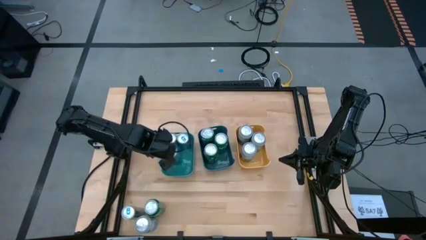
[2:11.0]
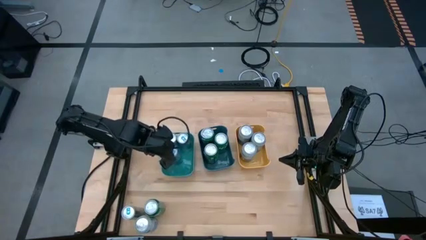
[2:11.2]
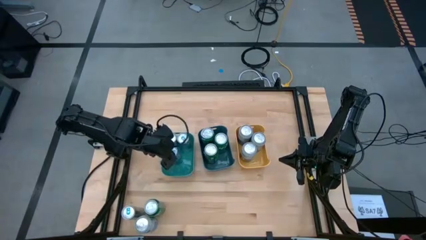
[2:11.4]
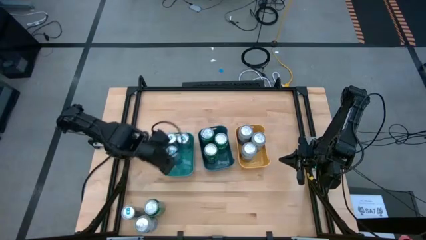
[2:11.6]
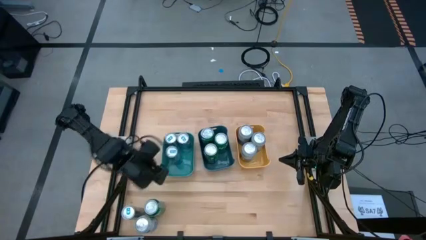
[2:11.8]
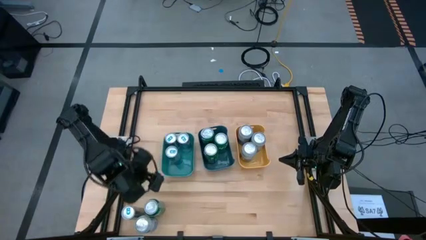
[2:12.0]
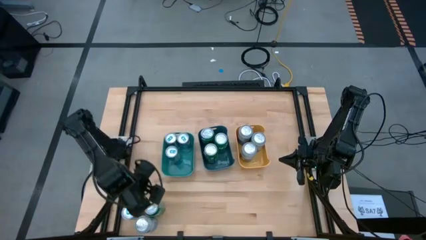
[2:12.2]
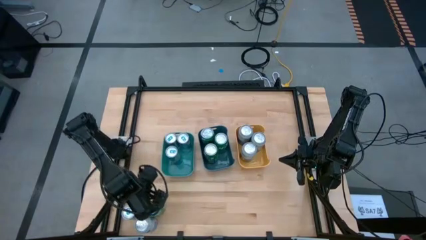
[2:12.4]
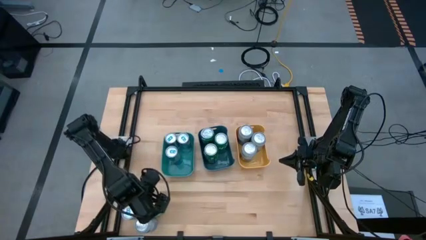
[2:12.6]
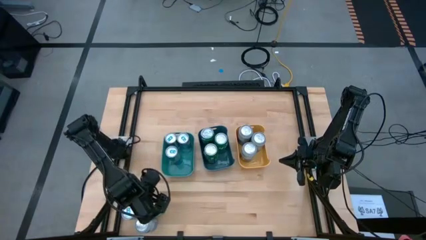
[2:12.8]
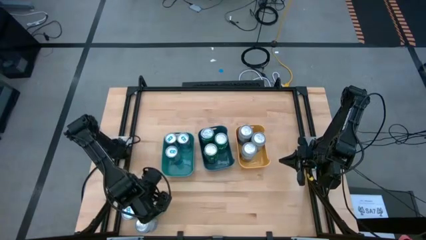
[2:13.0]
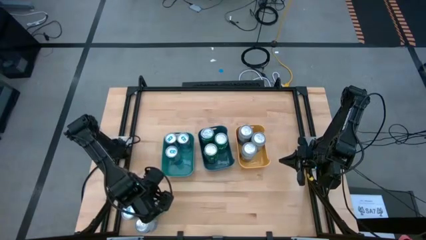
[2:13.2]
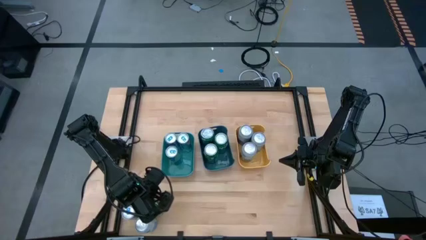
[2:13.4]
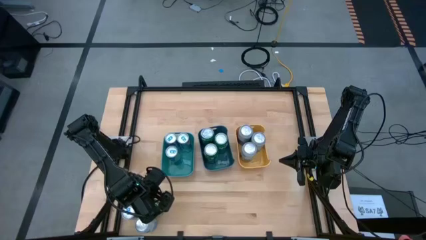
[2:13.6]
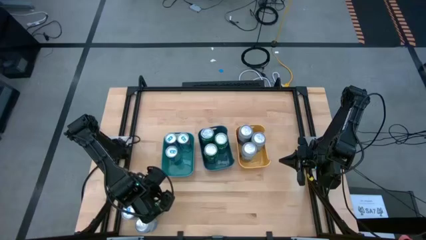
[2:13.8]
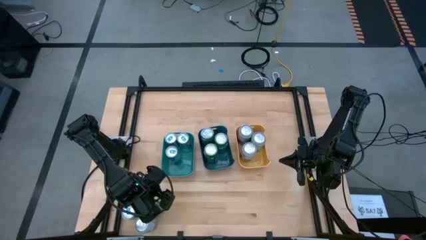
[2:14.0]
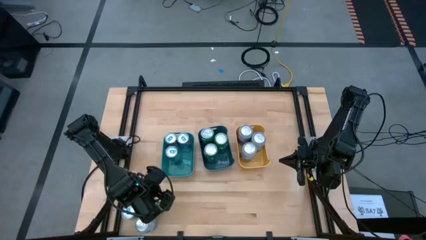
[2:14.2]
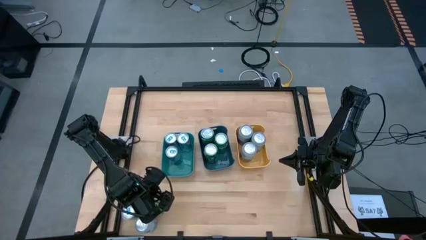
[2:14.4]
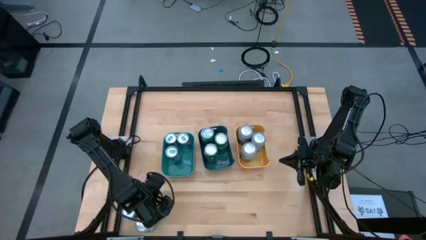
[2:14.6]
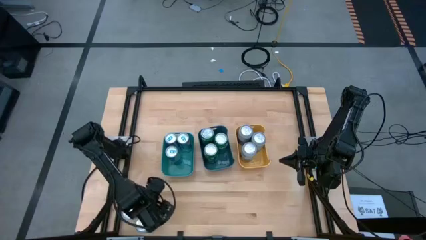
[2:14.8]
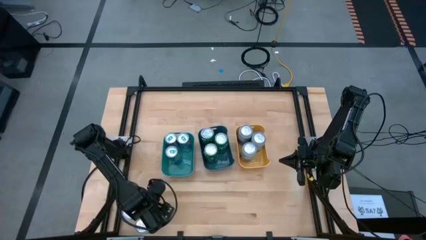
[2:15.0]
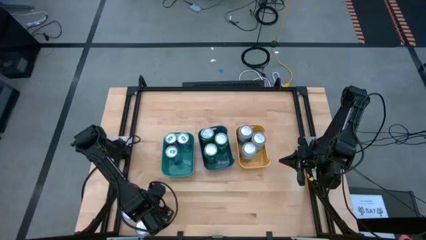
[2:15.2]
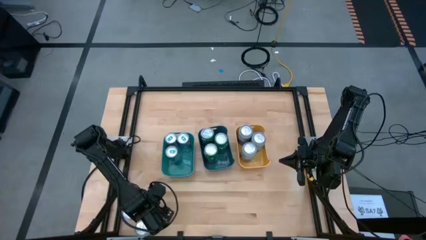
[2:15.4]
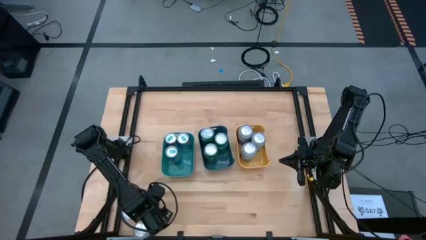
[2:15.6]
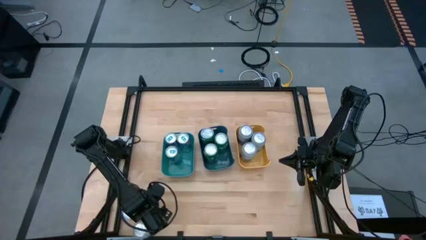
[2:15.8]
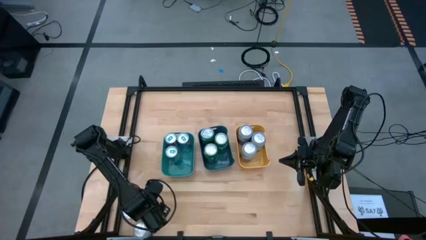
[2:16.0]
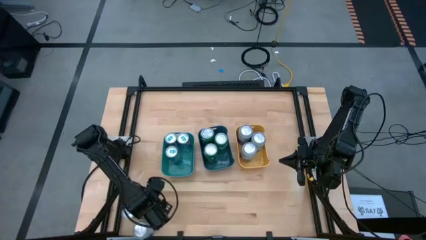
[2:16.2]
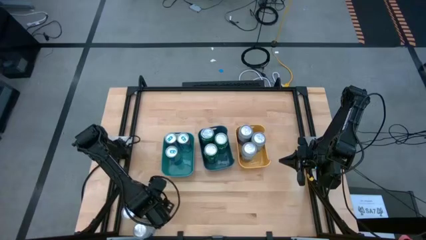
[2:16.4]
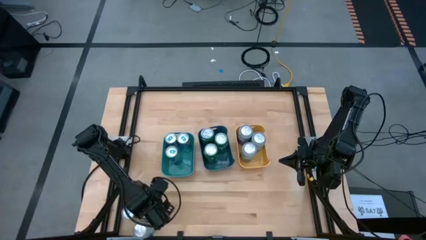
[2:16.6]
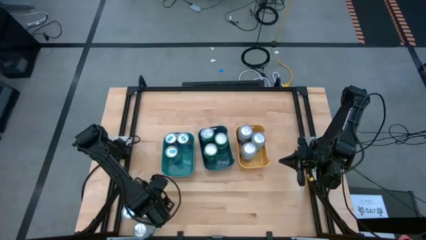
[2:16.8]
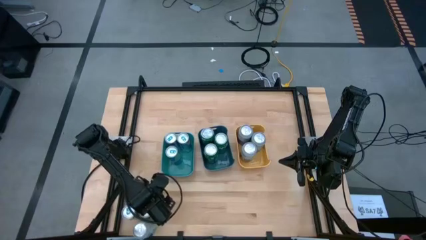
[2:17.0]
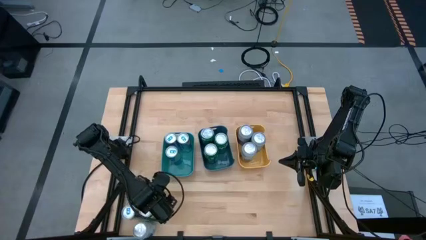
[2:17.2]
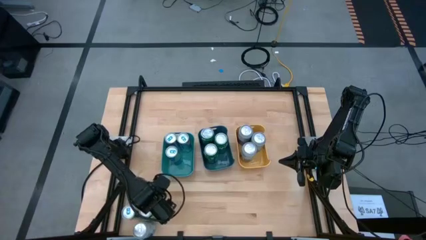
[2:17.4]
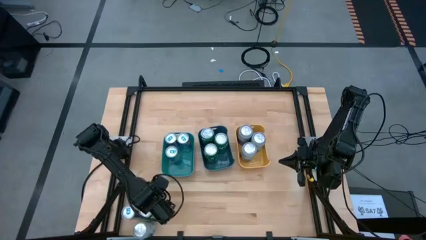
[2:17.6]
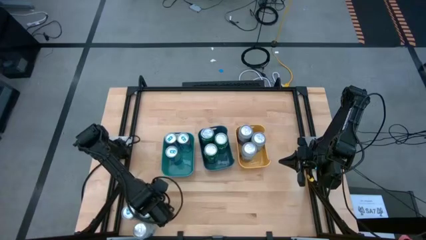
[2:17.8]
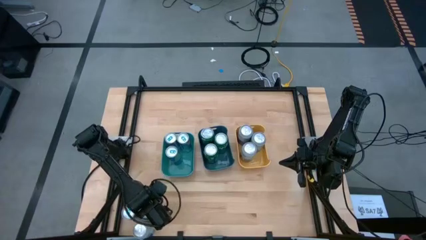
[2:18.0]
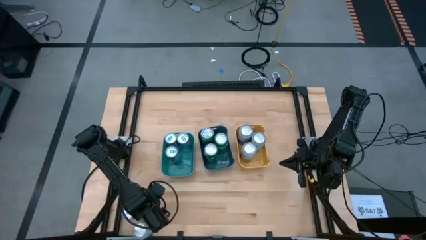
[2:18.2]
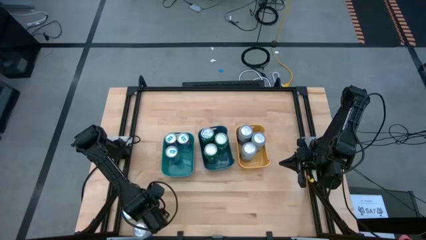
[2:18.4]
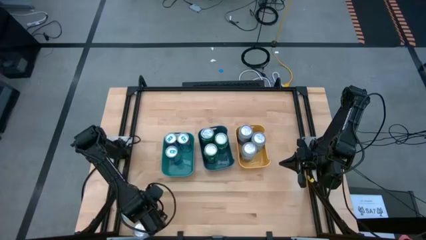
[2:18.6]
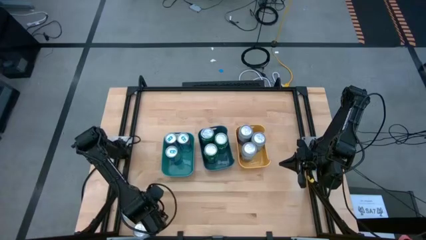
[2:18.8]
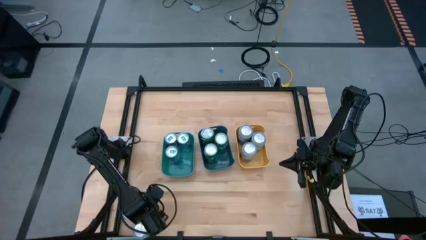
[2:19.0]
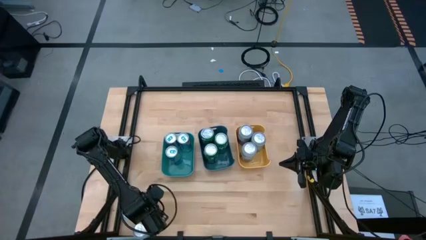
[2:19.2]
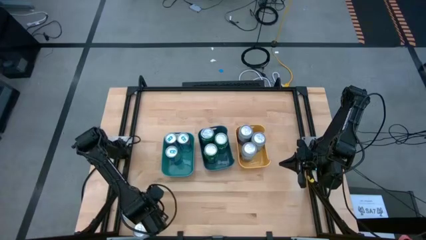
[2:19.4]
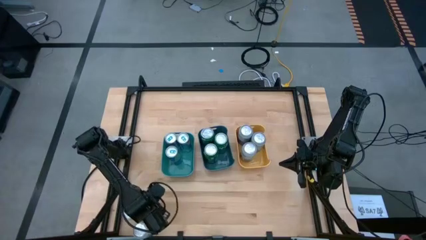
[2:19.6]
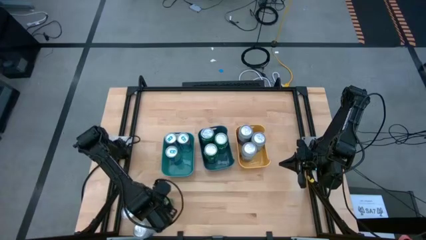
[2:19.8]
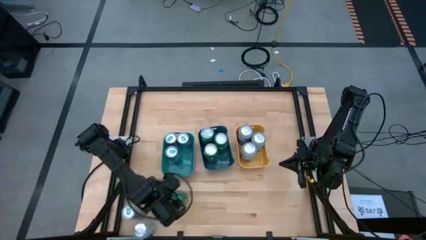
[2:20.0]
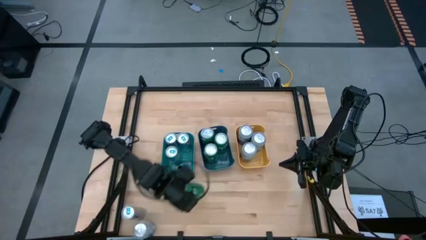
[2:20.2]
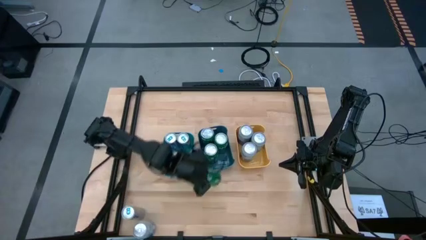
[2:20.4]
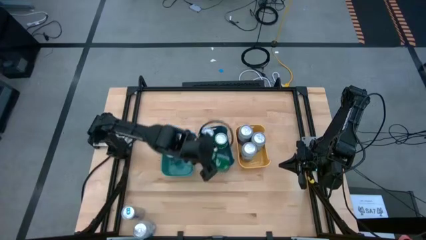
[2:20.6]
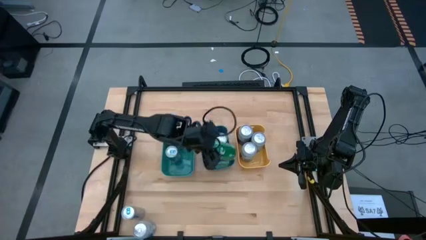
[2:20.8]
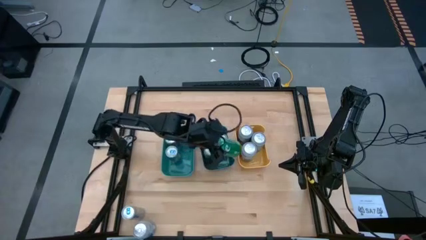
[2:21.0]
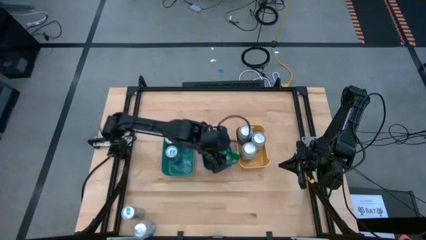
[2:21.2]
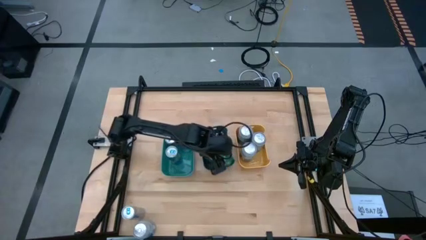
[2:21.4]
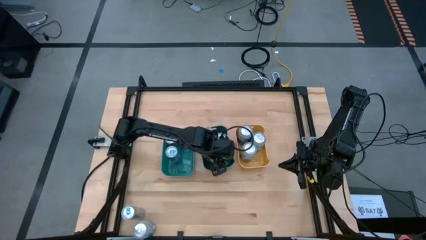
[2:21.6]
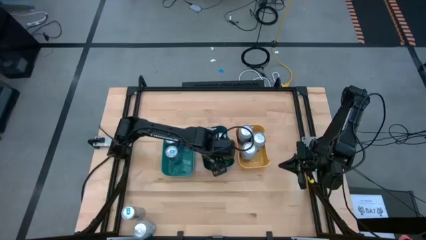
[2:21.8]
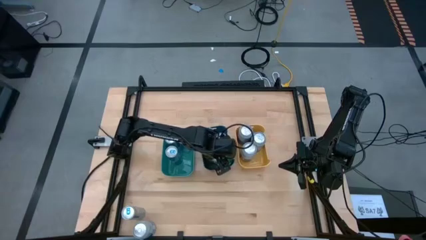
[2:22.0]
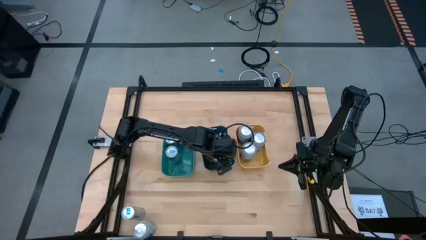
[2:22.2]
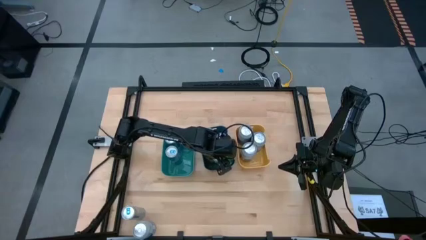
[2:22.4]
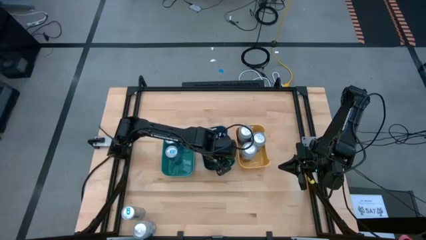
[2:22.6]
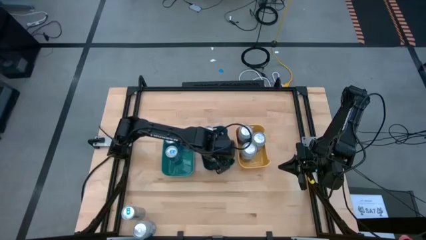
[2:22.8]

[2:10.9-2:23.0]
Task: Sort soda cans
Put the green soda can into the blue bin

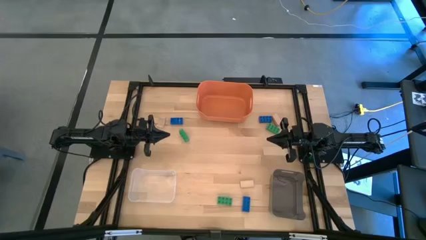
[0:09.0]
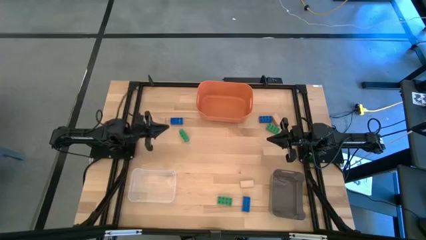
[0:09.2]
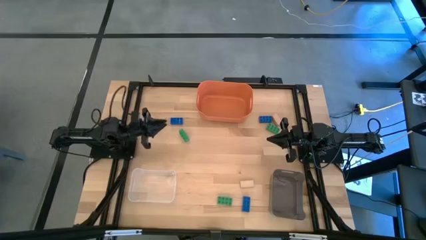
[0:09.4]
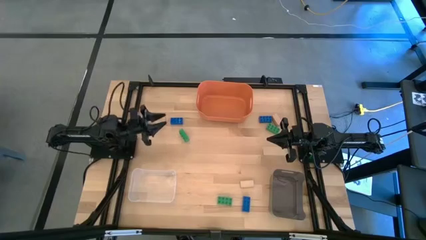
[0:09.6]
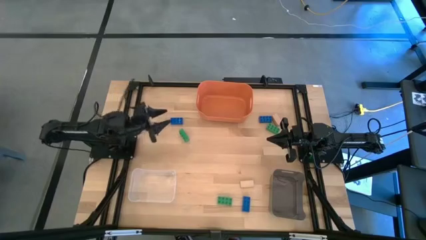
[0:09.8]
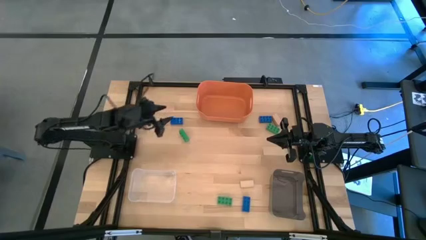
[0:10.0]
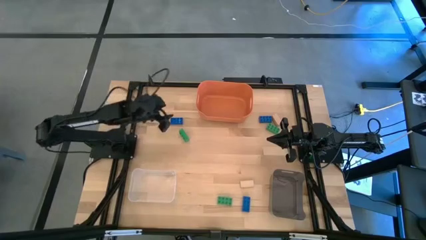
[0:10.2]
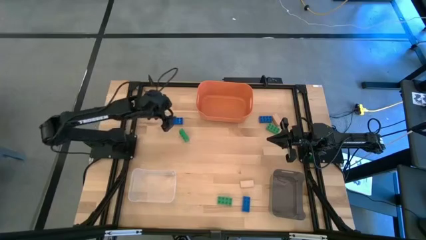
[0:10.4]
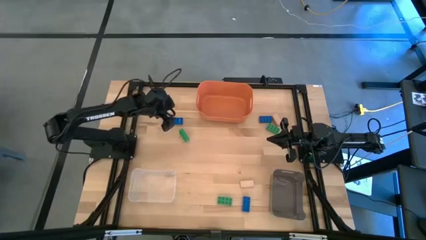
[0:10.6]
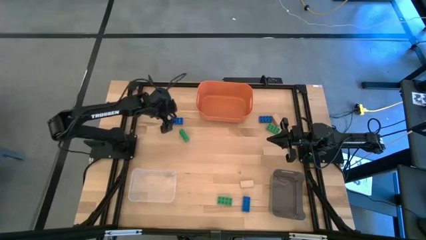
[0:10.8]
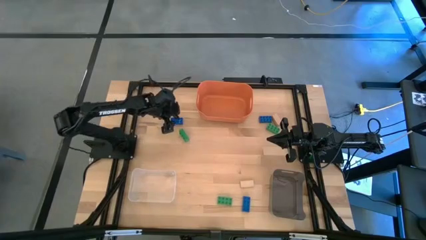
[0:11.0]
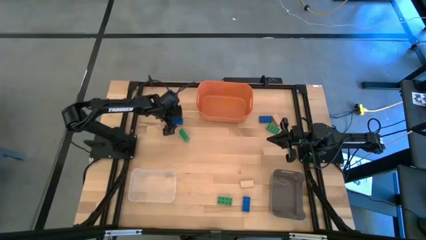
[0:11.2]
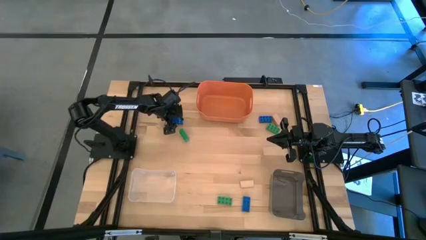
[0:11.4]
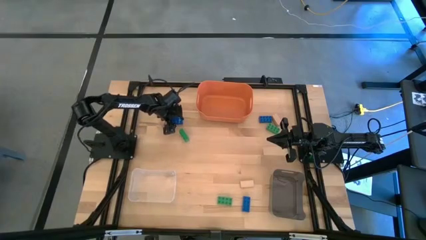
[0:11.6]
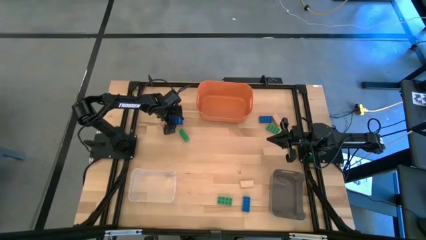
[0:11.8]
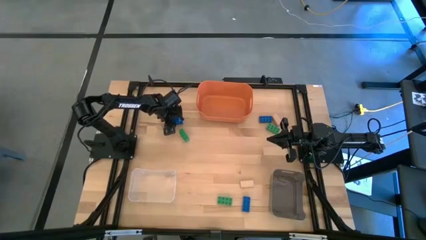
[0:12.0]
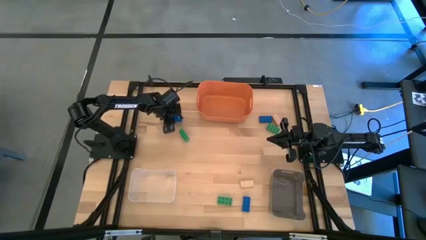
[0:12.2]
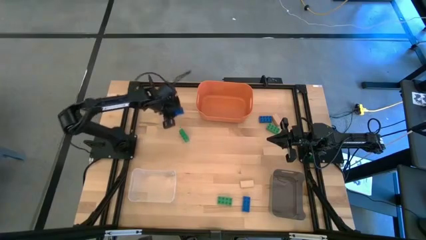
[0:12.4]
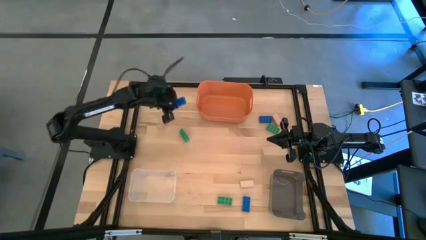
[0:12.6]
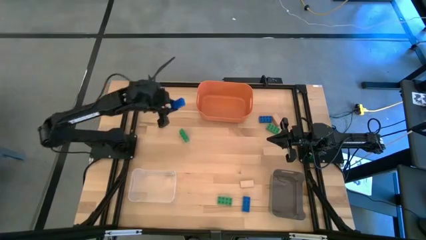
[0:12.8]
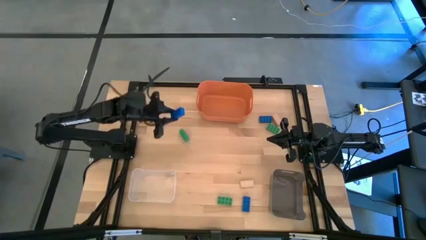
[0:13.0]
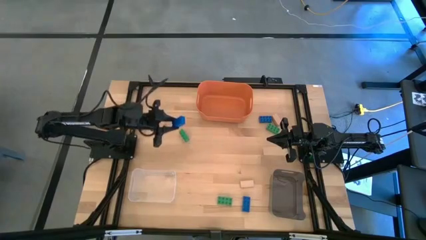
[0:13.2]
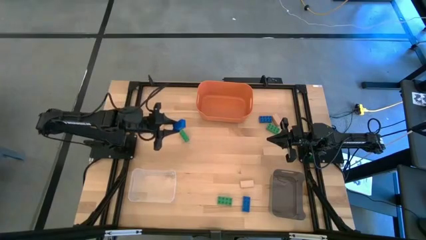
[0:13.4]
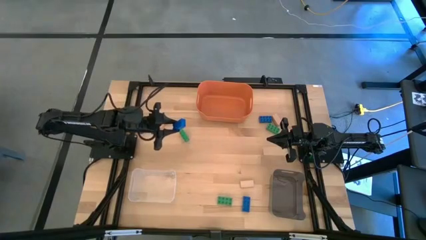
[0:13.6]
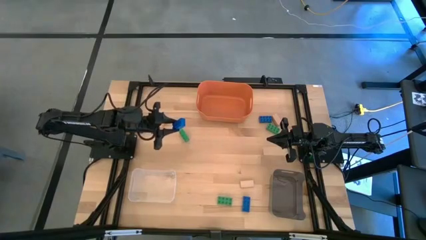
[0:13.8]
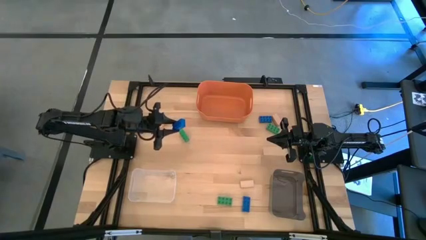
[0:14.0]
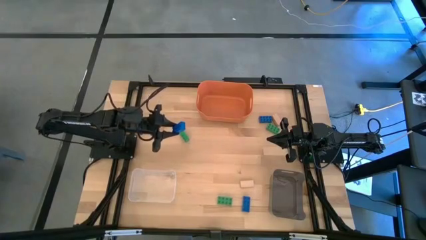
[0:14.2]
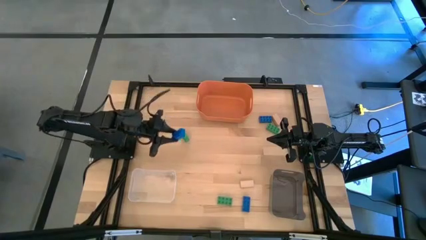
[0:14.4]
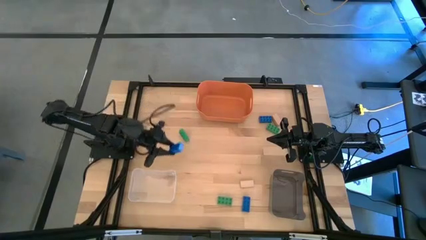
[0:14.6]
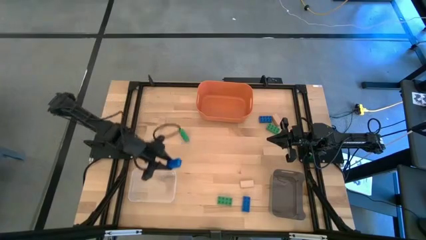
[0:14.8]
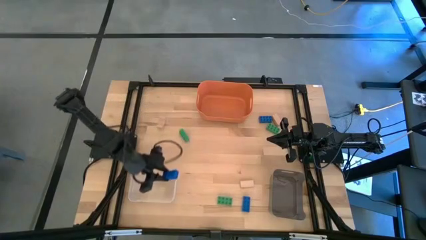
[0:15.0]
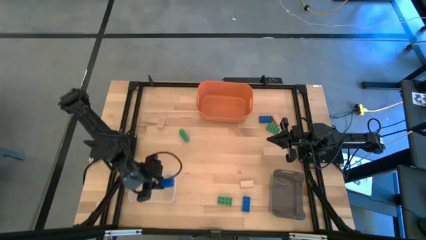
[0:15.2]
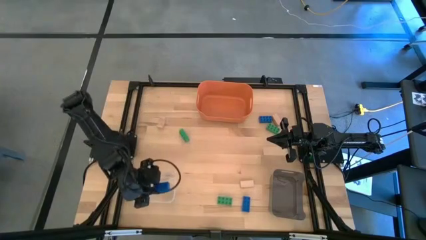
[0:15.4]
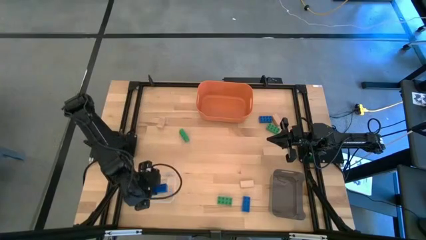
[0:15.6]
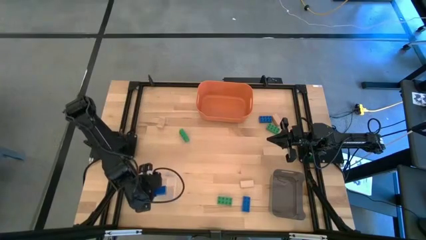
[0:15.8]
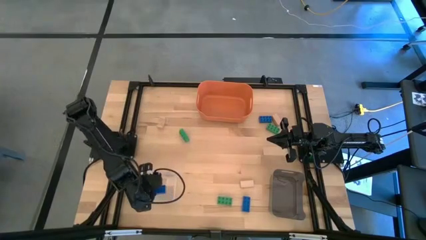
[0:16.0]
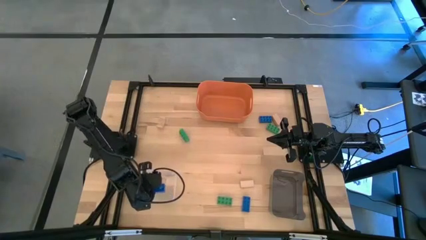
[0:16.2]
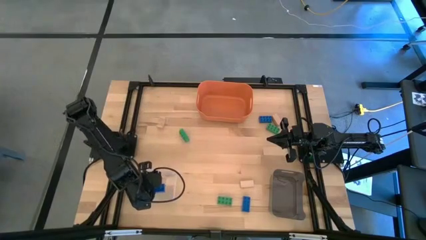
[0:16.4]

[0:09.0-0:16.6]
Task: Sort & place blocks by color
Put the top left blue 8 stud game piece into the white transparent bin
